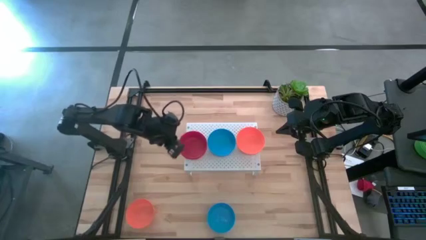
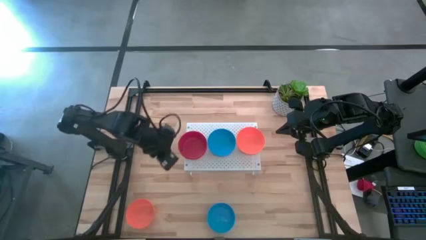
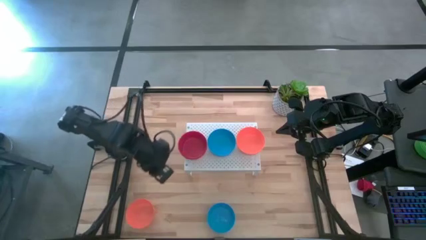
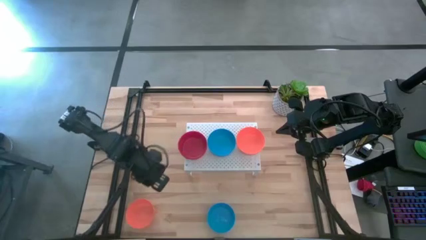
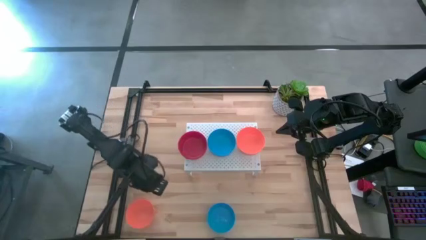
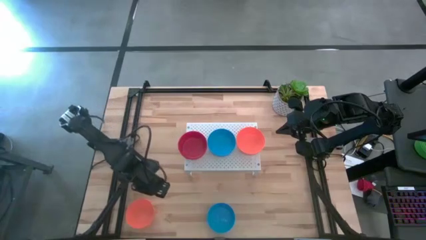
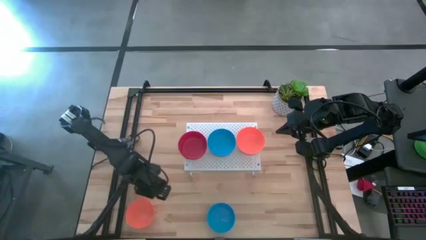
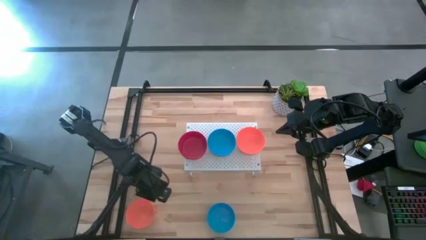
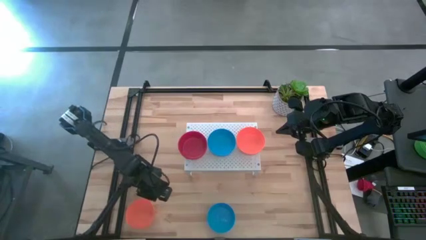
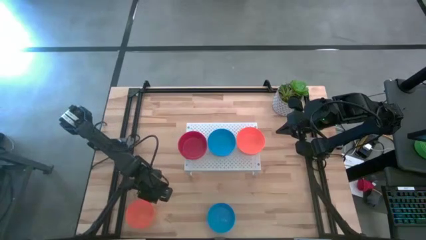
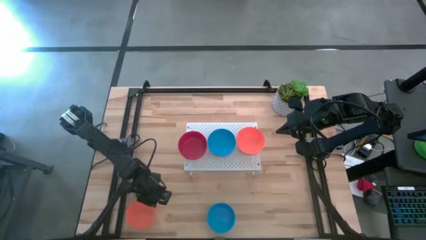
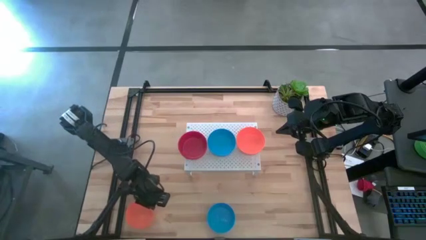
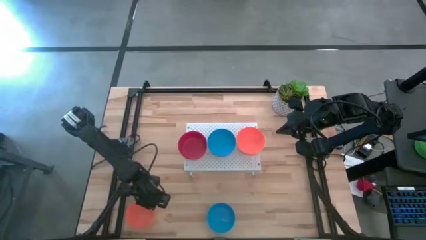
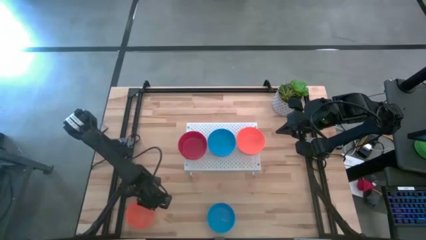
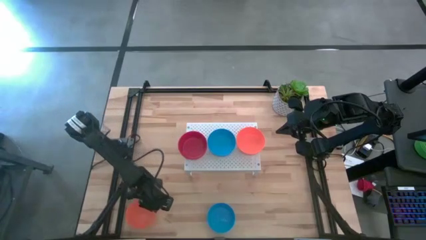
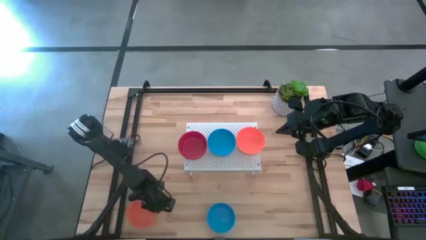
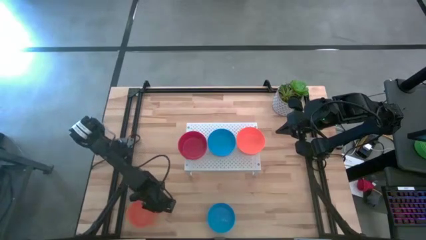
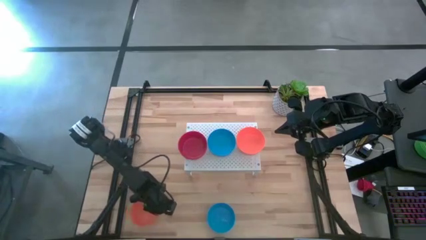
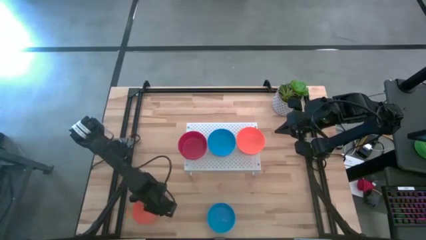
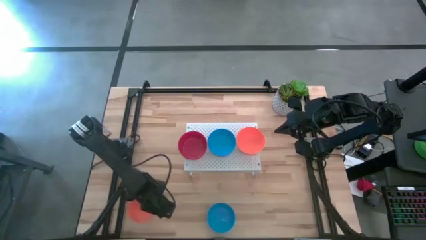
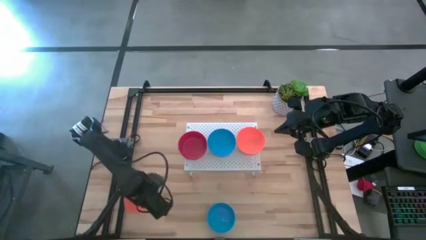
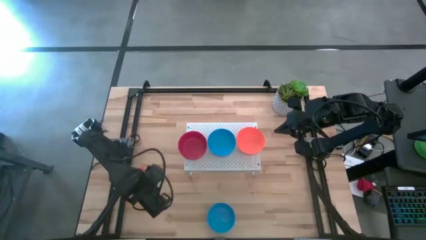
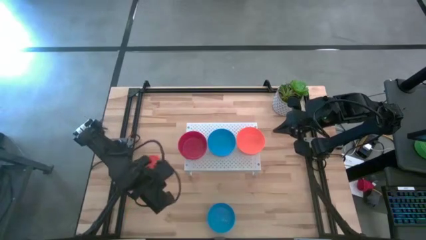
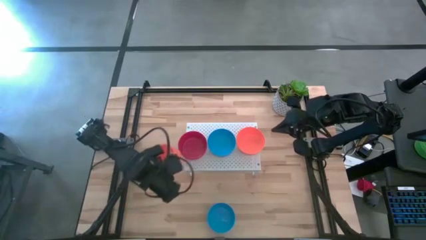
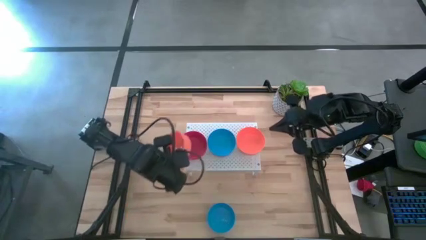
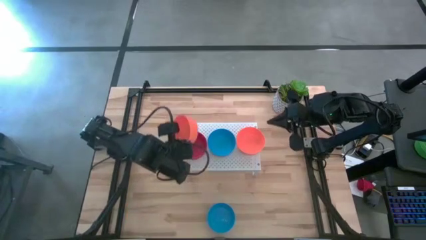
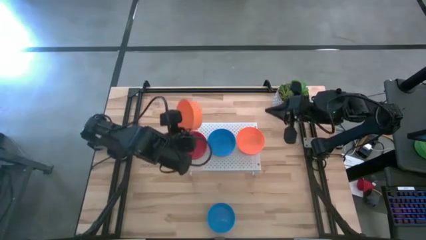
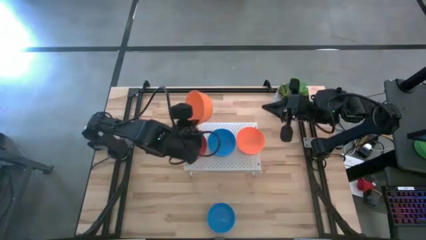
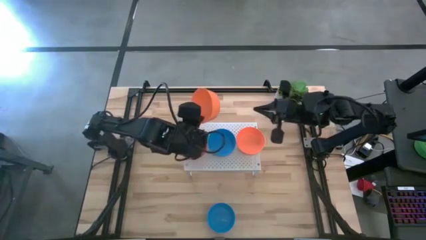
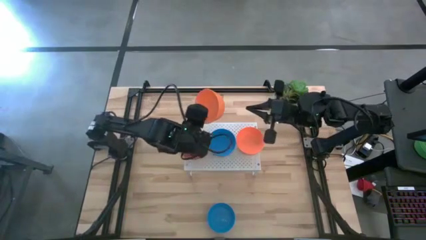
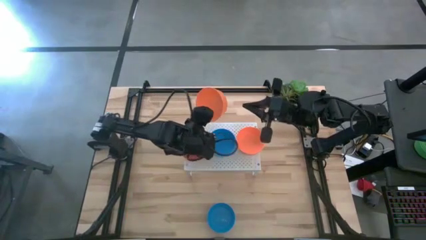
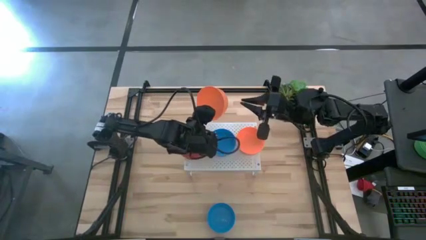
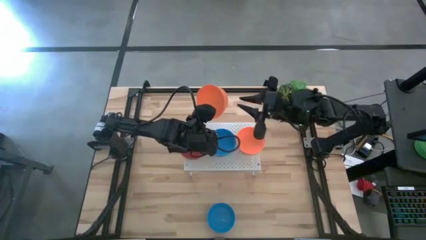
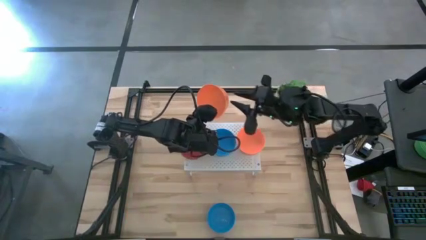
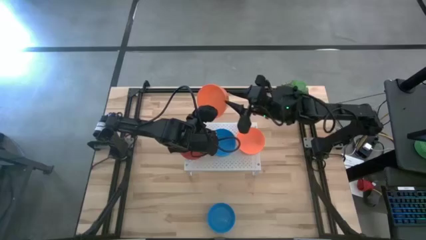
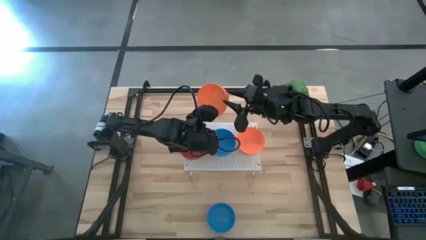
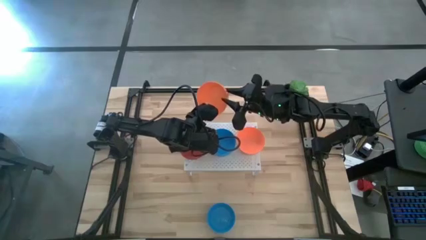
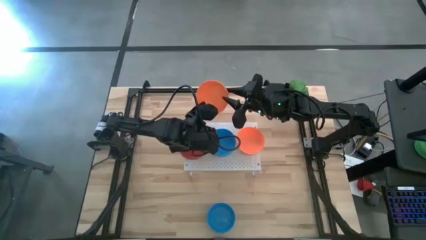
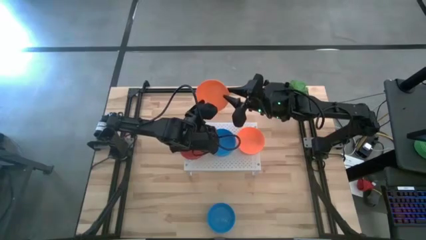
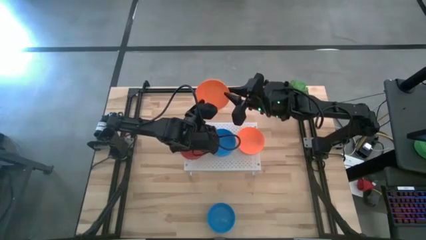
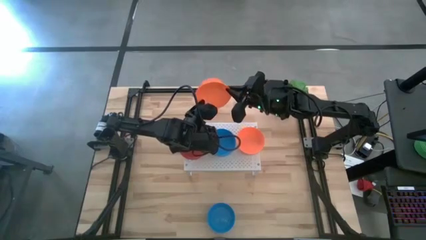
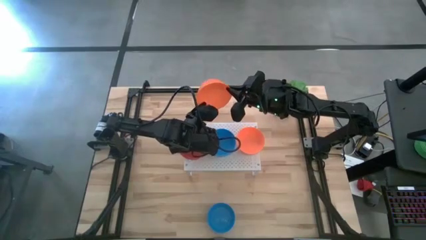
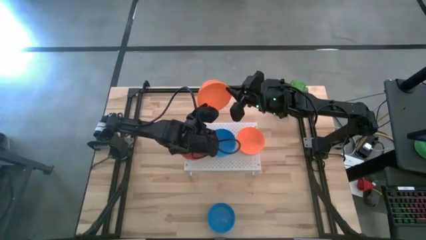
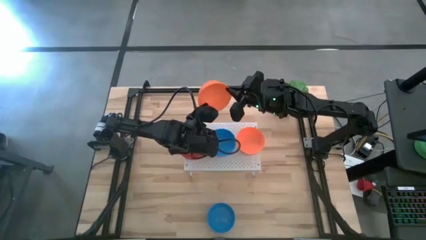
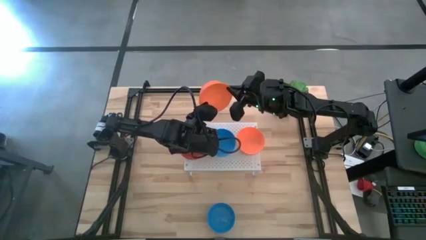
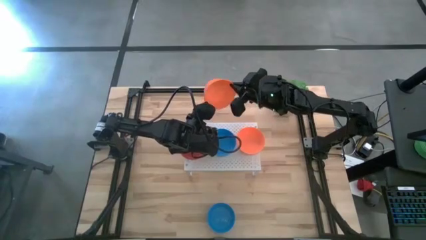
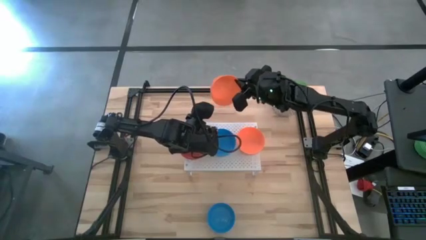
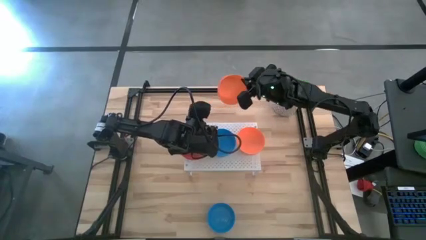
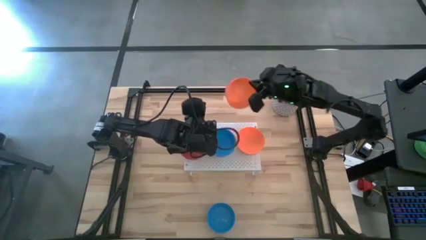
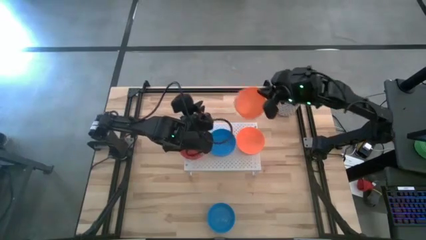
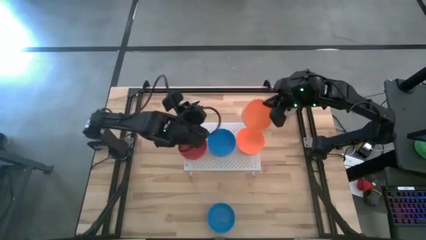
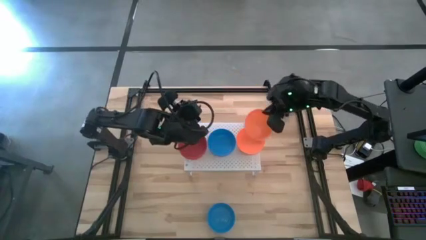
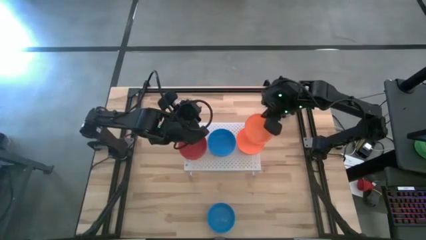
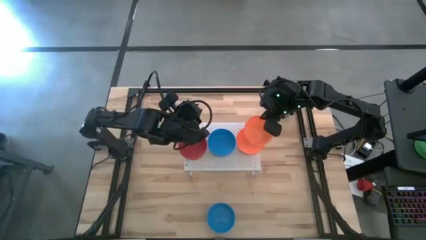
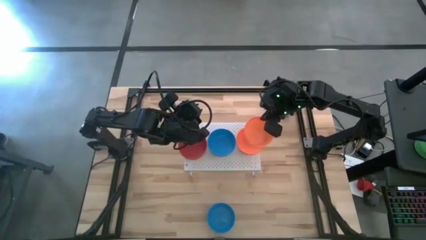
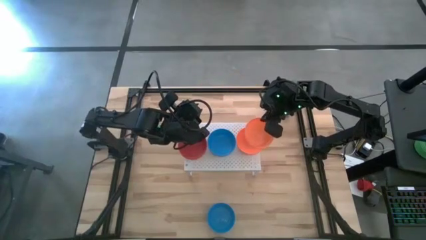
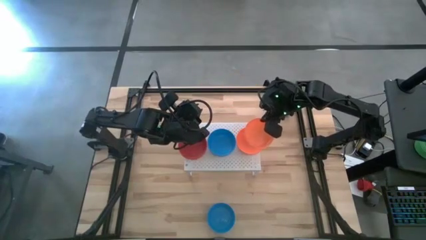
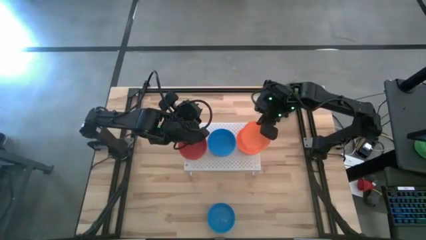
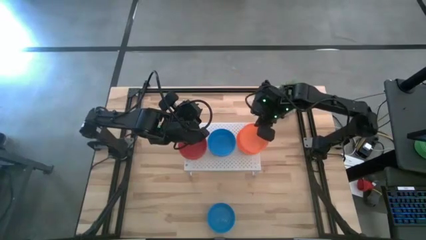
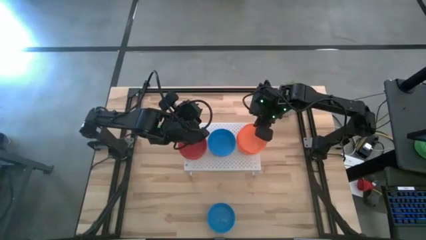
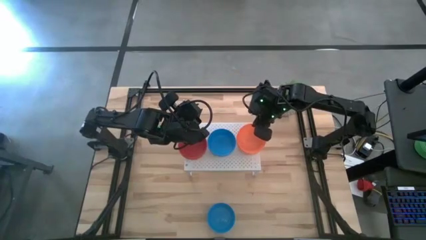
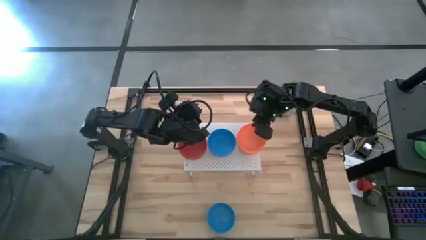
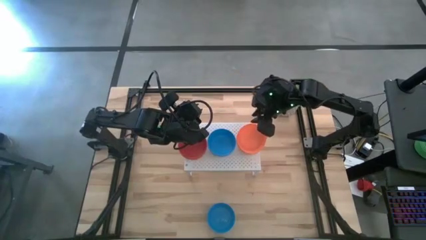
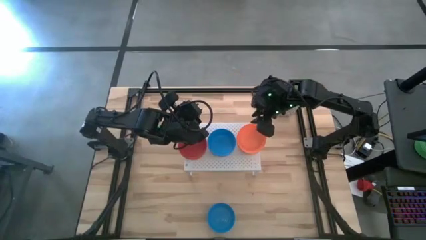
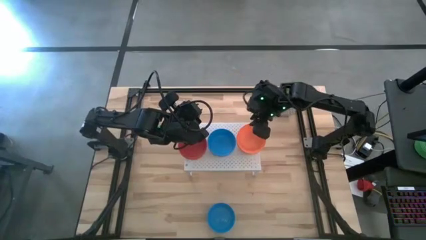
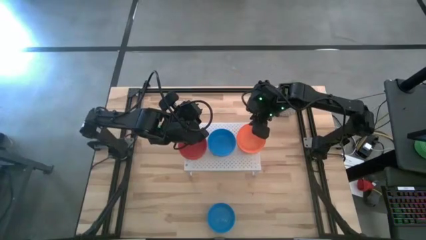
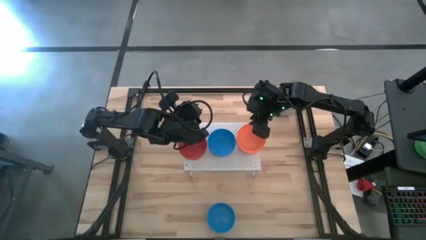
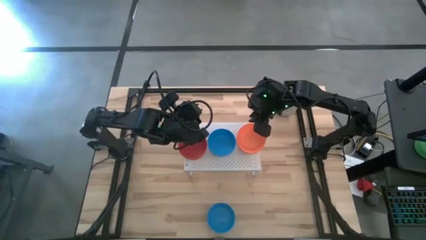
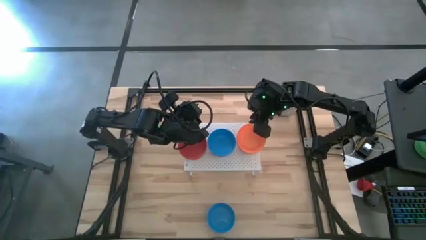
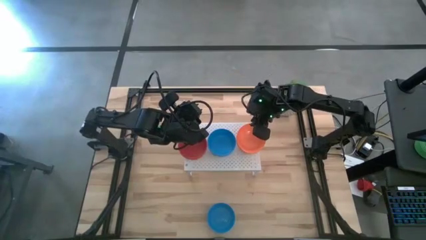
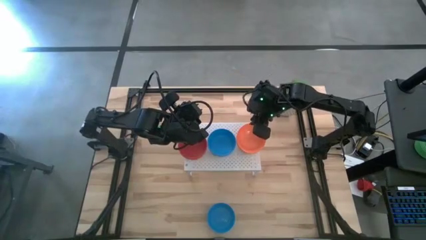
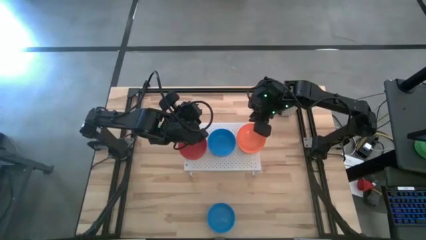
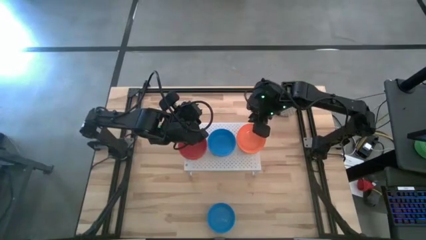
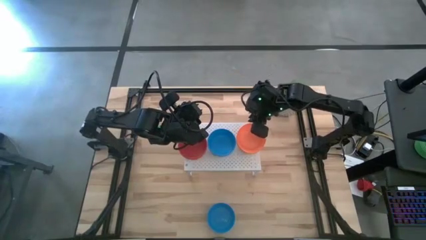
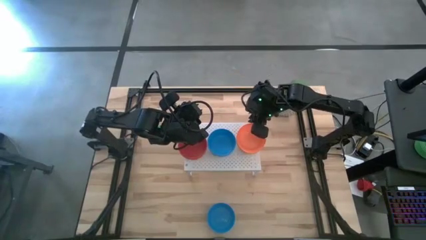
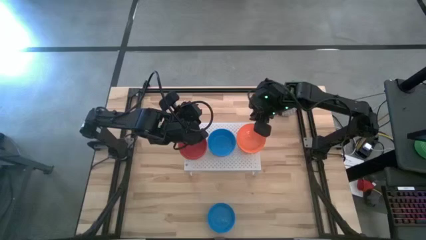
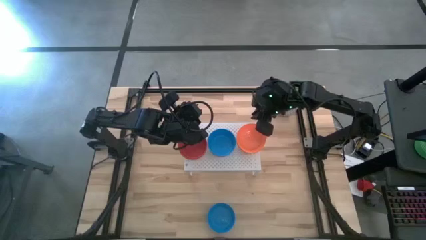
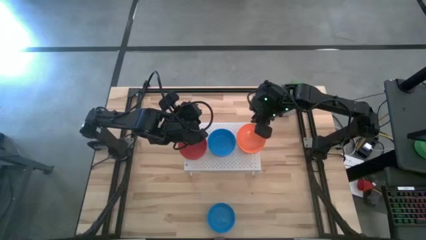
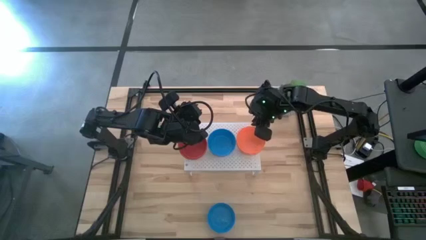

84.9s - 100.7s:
Task: Pick & Place Mini bowls
Stack the orange bowl on the orange bowl on the shelf

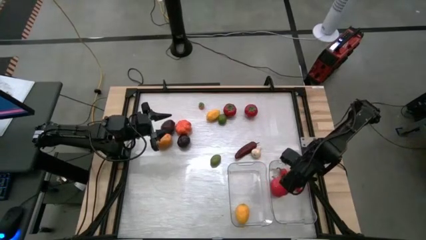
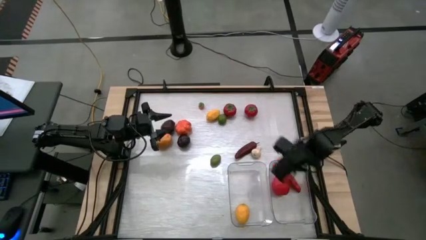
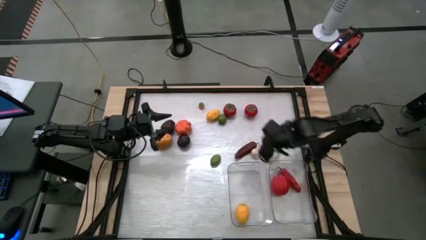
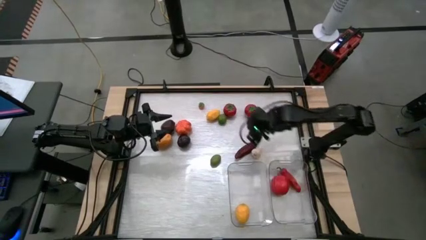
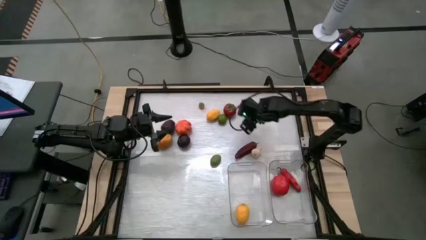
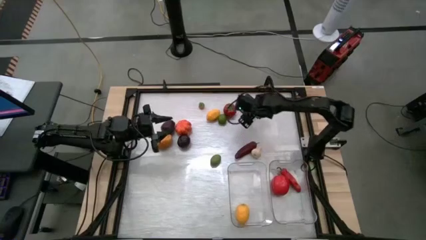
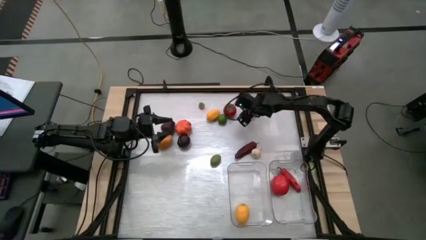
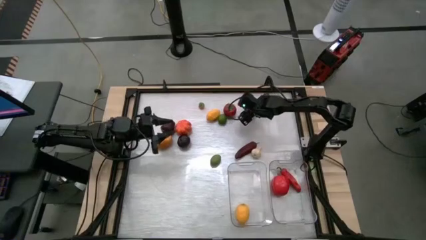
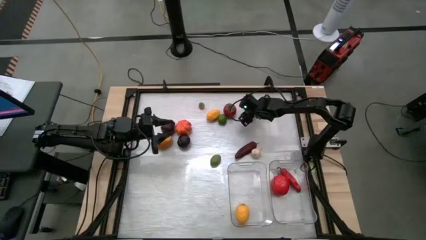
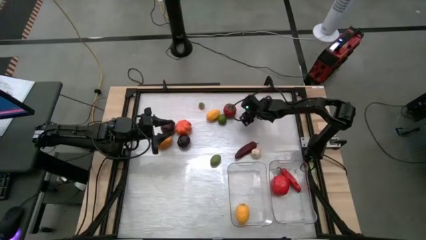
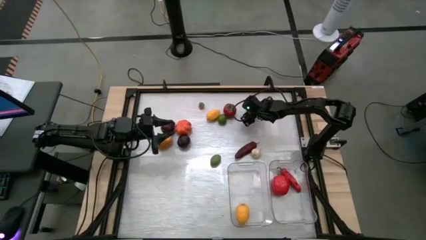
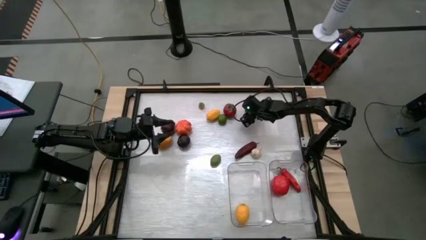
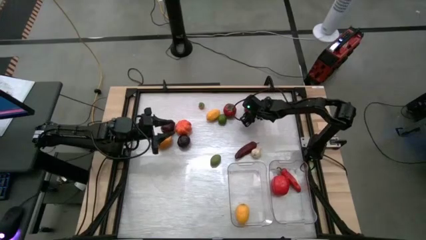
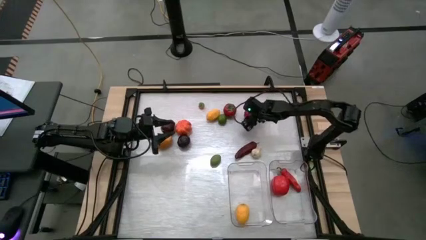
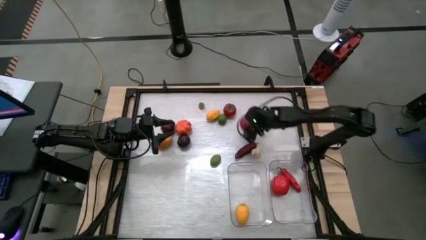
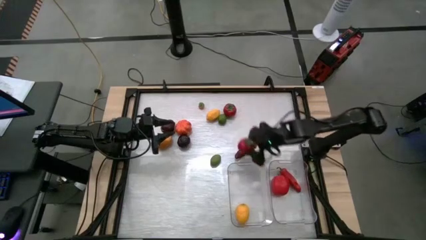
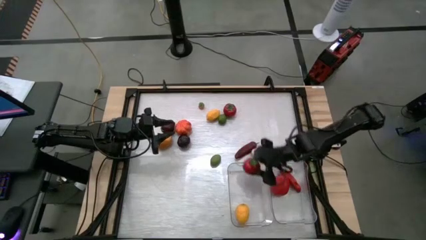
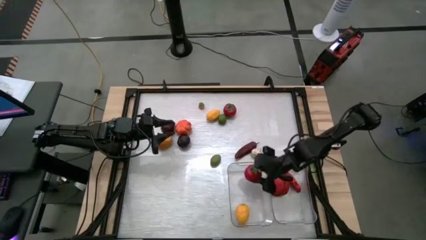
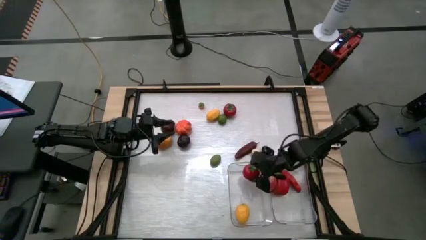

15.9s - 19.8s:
Task: Sort produce into baskets
Put the right tomato into the left transparent bin
